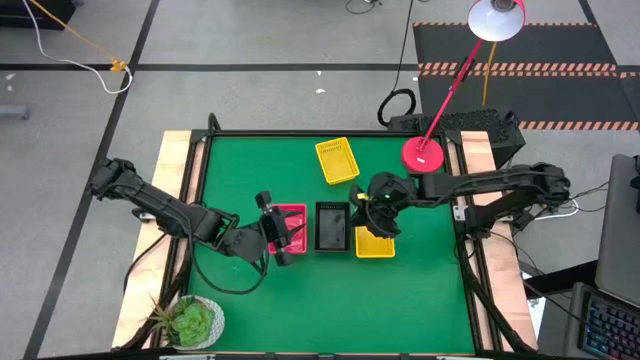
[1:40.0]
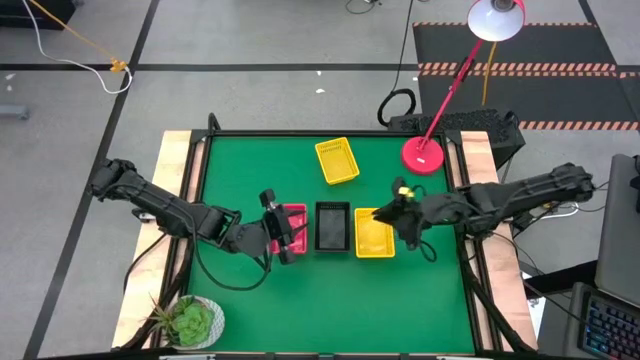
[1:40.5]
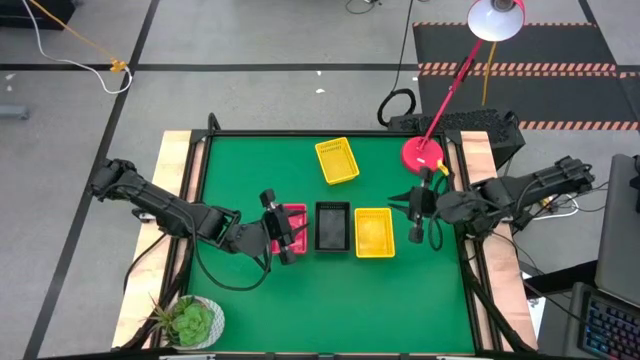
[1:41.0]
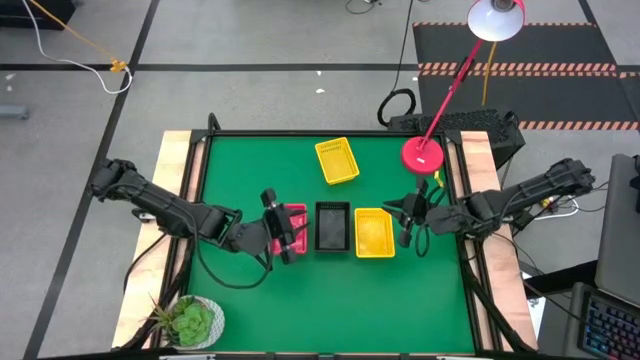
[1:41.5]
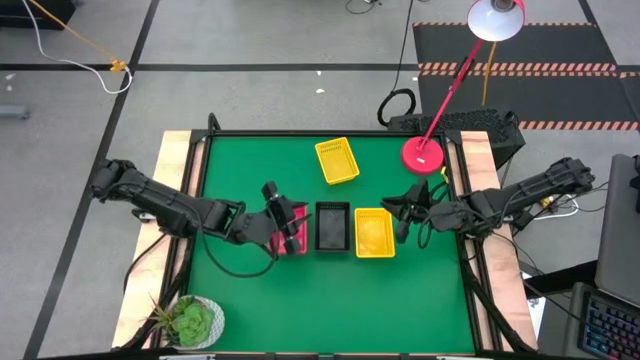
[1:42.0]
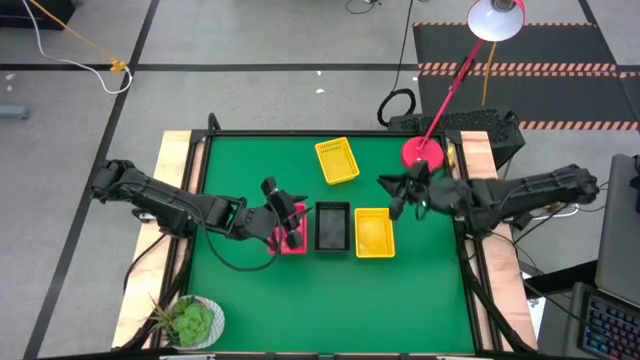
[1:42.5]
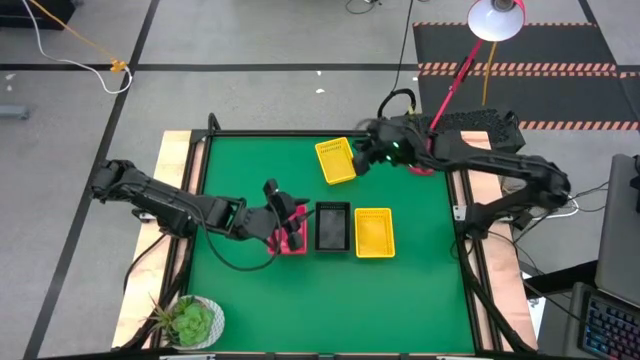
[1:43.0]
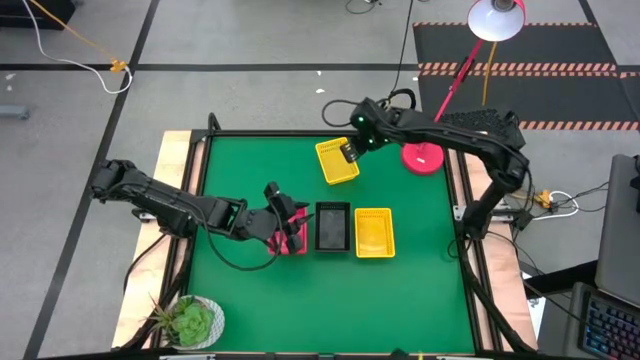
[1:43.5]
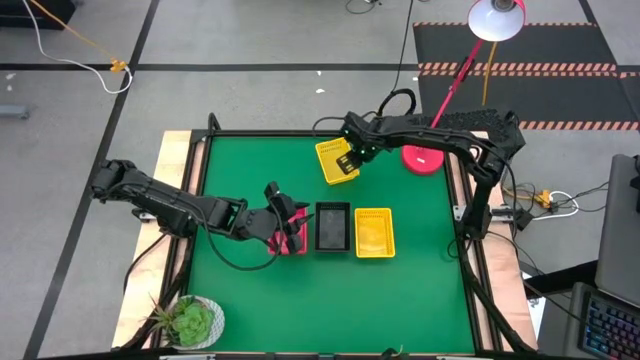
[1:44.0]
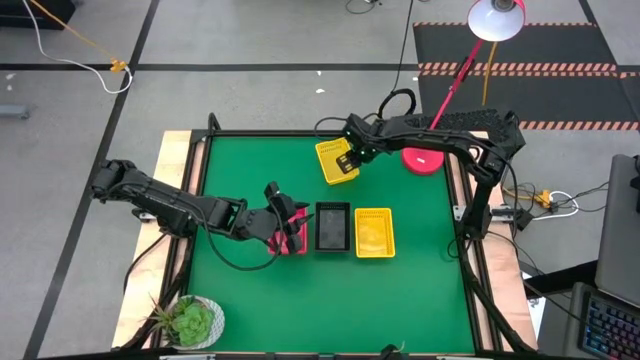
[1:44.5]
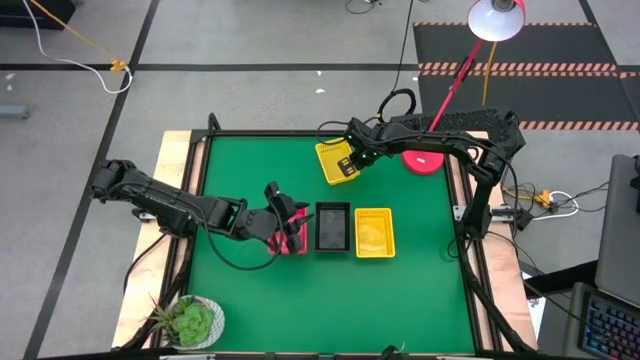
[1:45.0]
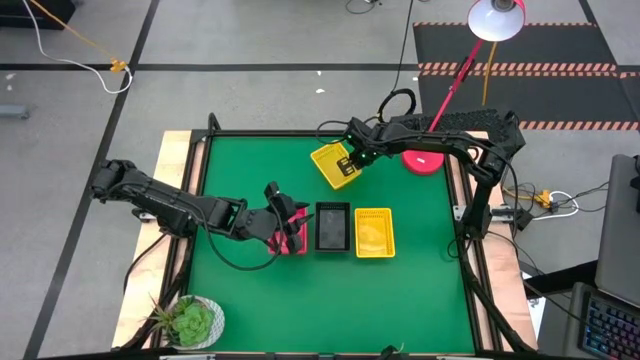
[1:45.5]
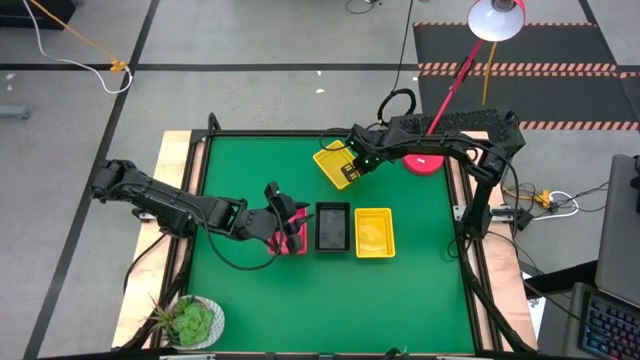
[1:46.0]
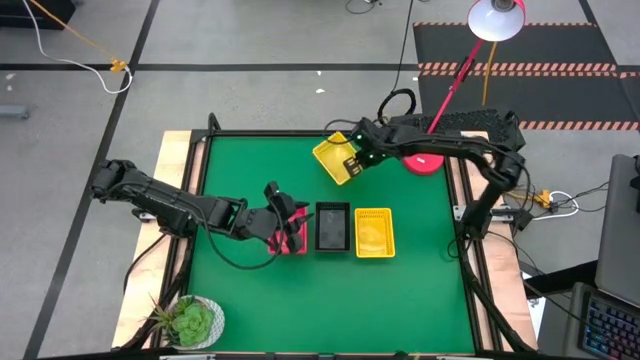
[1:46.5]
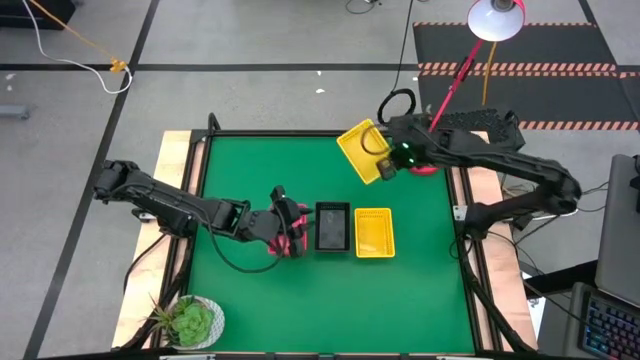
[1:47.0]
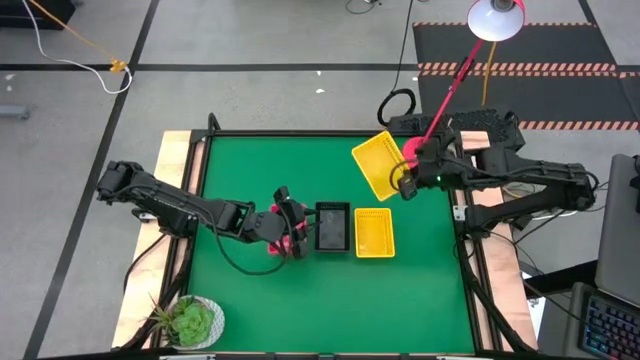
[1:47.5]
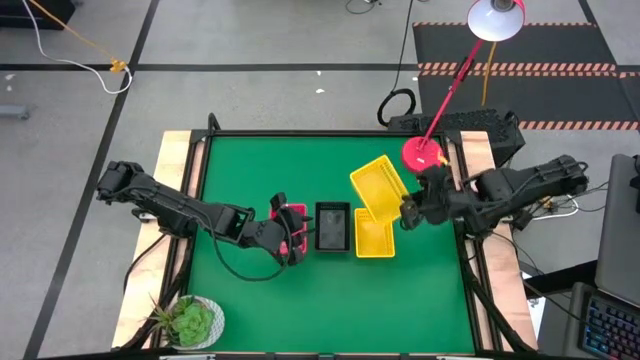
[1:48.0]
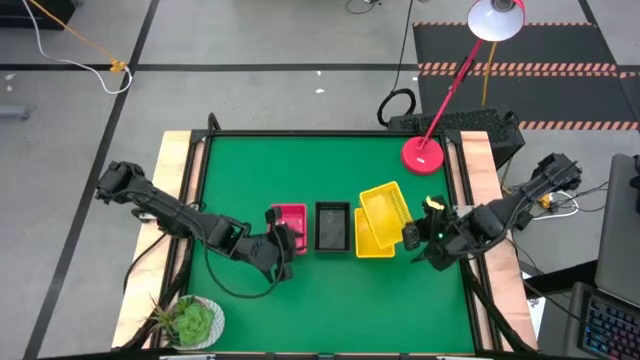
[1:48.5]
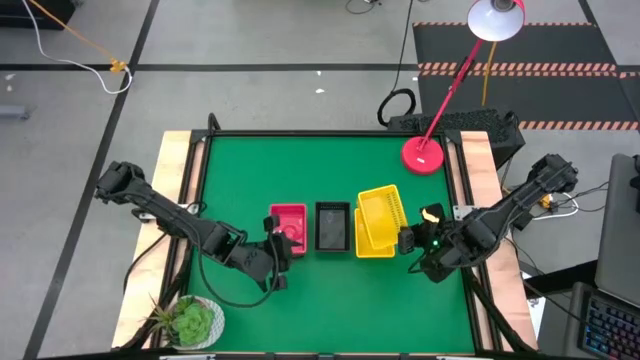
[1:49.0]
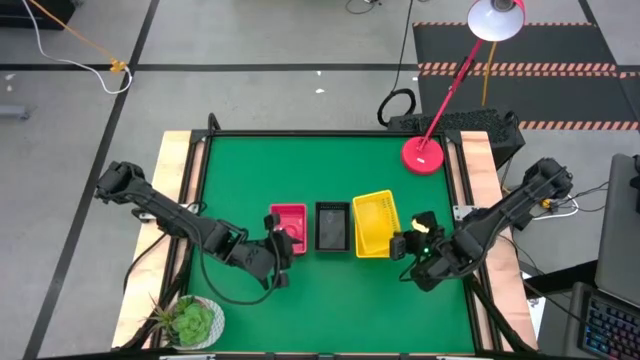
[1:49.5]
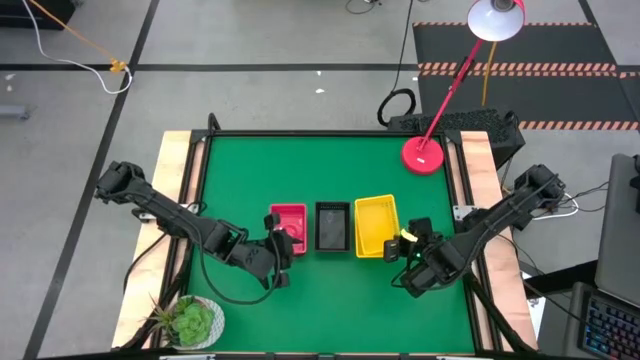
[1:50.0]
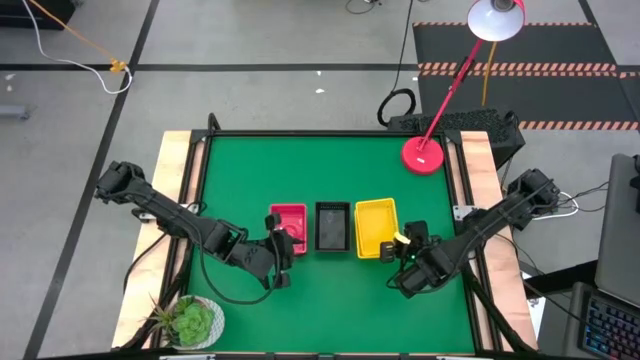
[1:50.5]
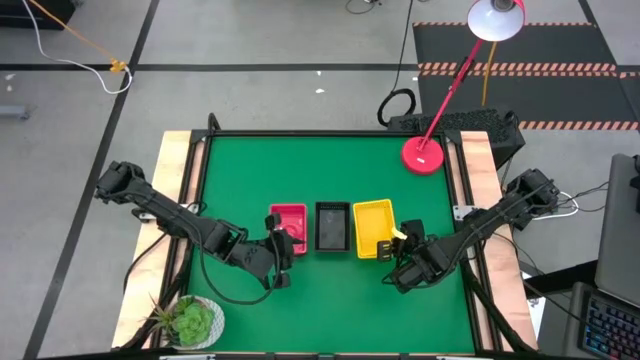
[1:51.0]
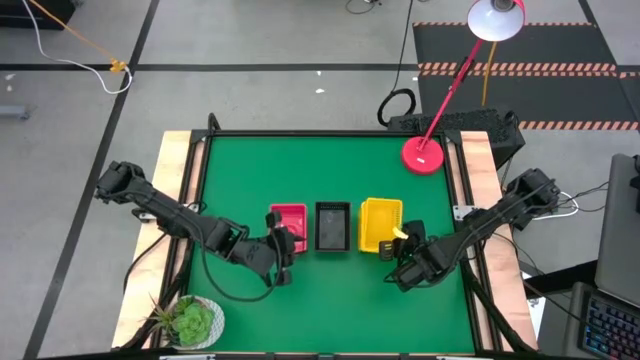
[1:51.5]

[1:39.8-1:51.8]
Stack the top yellow bin on top of the bottom yellow bin
